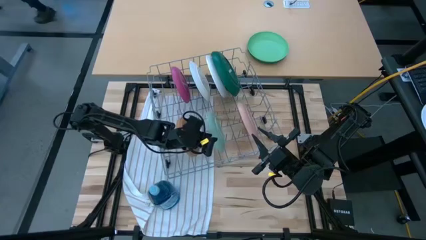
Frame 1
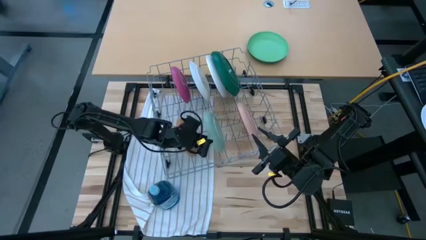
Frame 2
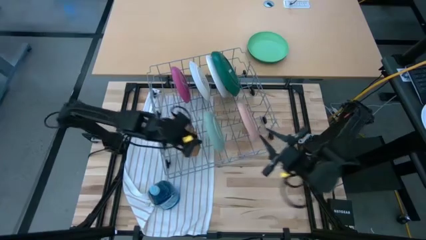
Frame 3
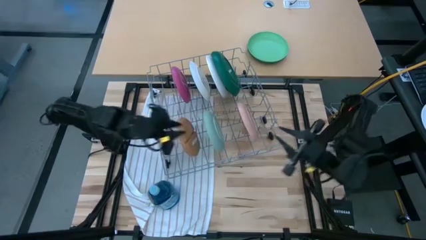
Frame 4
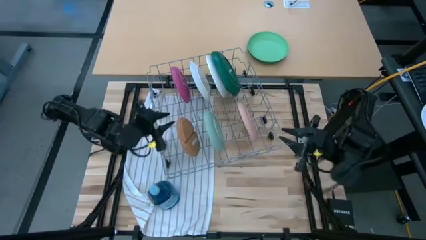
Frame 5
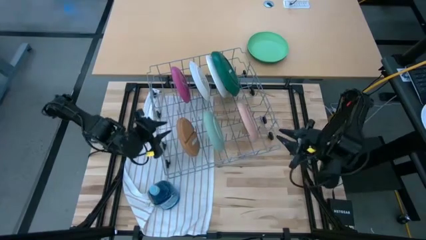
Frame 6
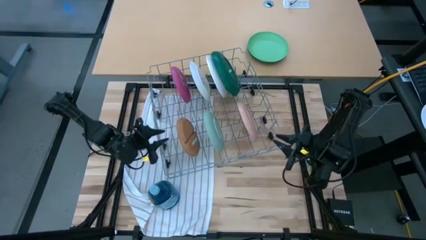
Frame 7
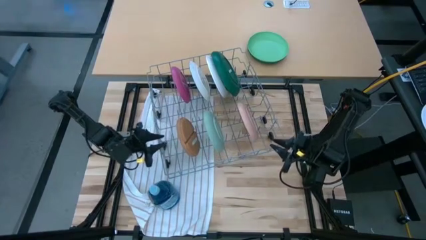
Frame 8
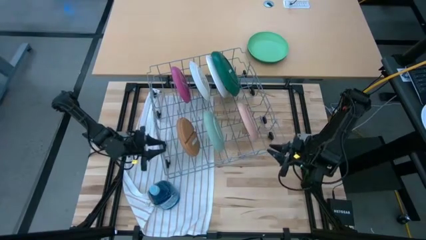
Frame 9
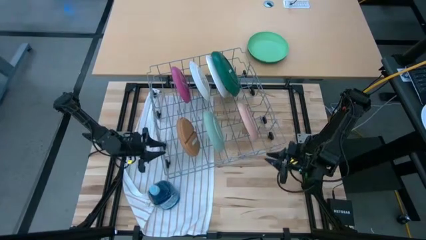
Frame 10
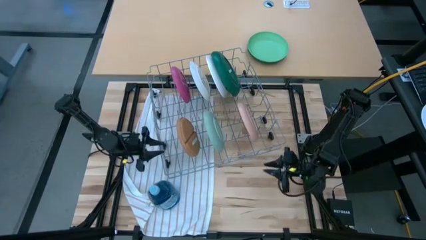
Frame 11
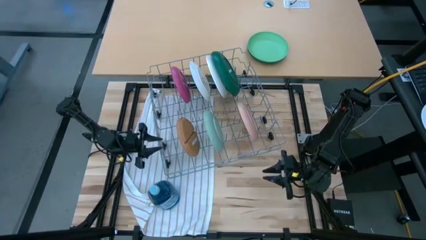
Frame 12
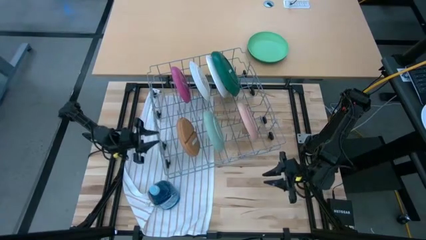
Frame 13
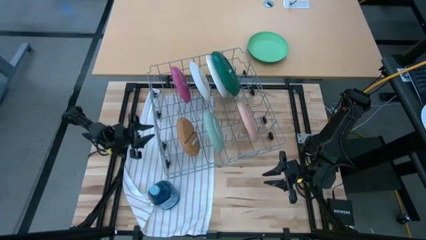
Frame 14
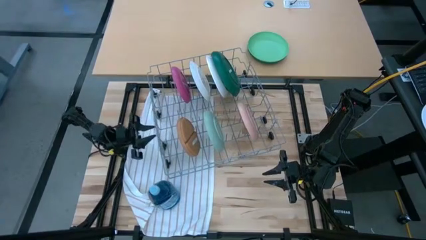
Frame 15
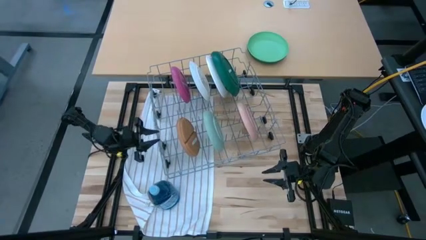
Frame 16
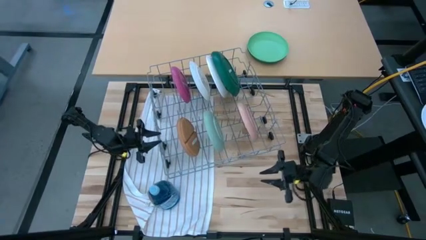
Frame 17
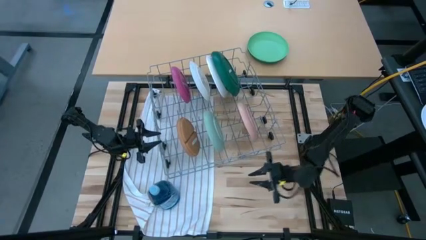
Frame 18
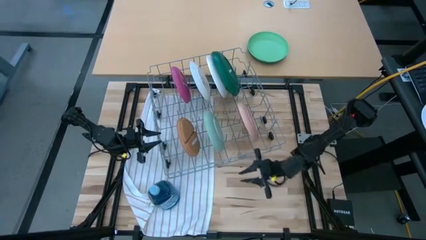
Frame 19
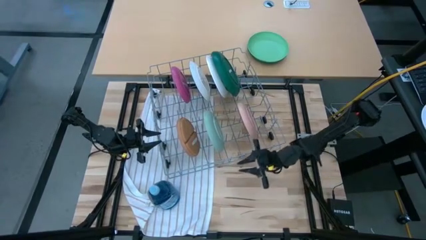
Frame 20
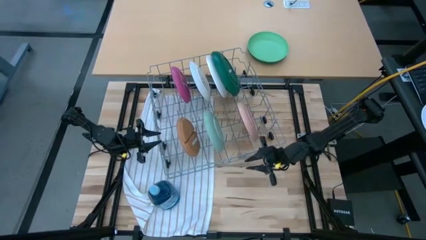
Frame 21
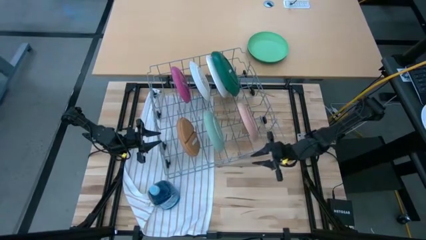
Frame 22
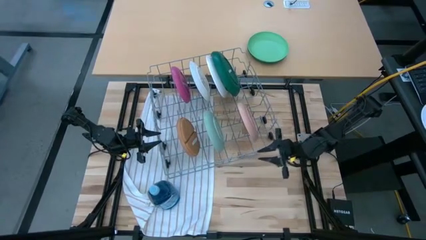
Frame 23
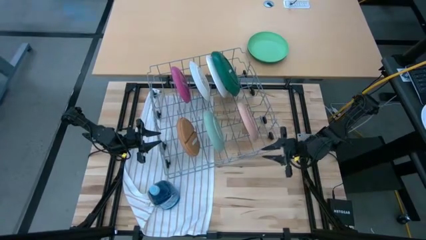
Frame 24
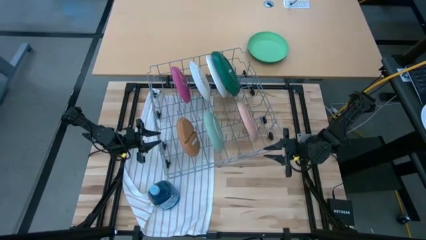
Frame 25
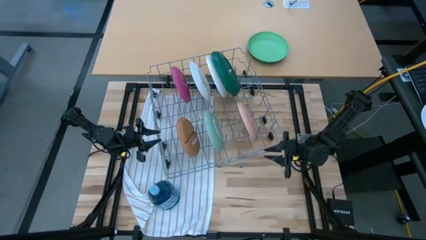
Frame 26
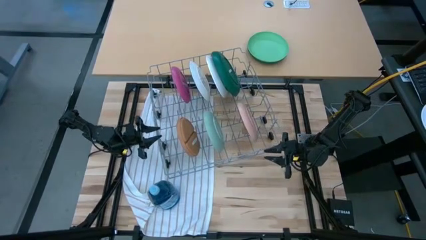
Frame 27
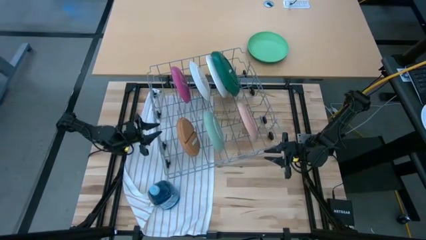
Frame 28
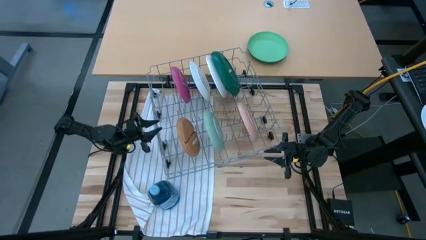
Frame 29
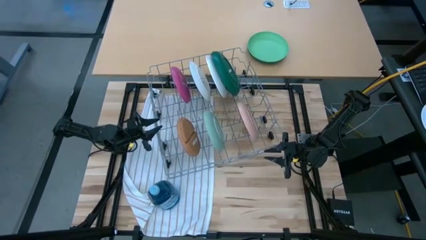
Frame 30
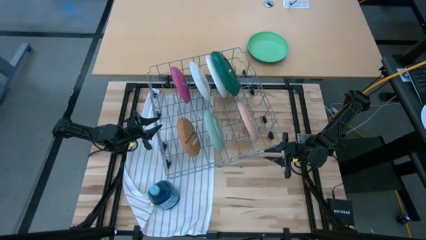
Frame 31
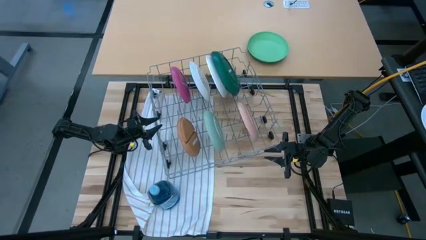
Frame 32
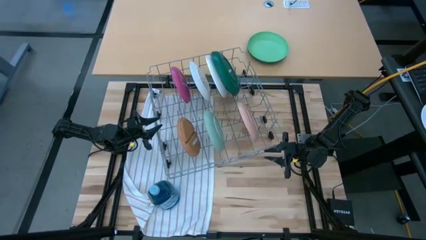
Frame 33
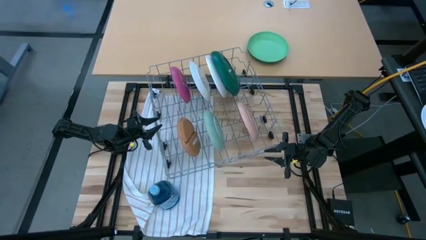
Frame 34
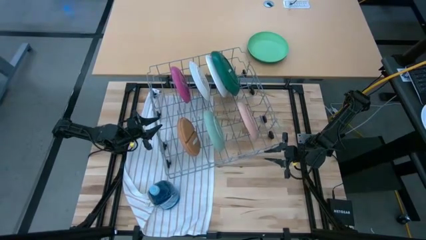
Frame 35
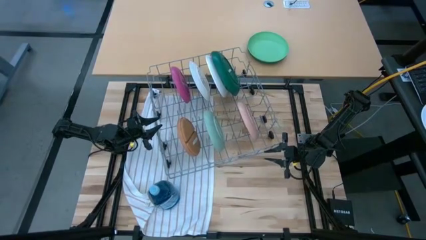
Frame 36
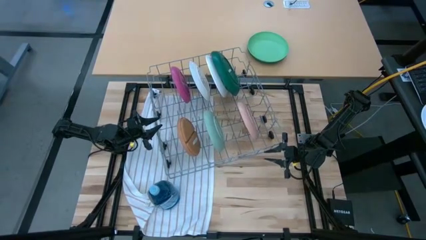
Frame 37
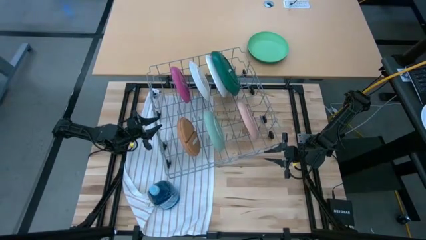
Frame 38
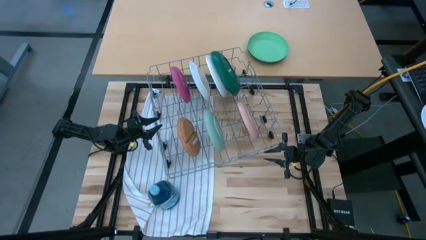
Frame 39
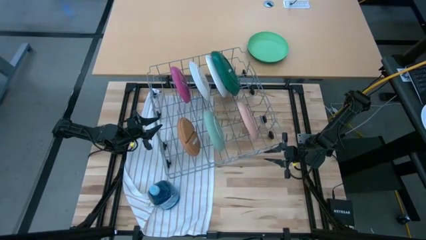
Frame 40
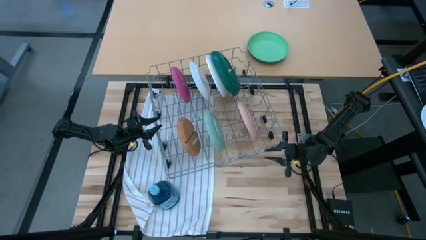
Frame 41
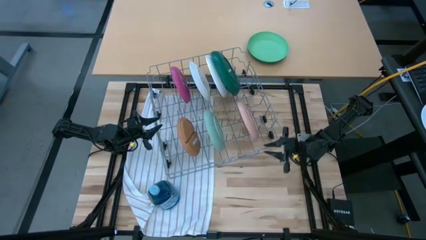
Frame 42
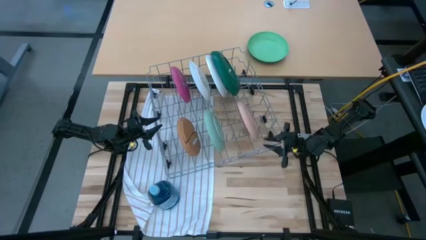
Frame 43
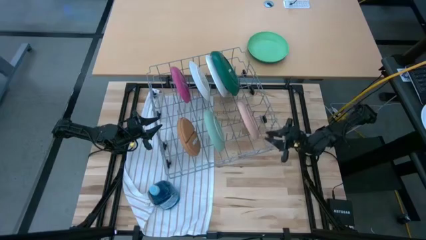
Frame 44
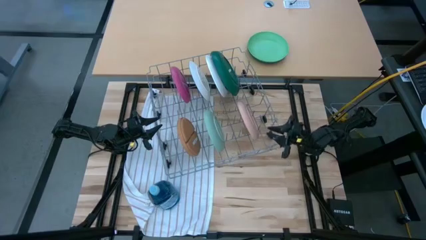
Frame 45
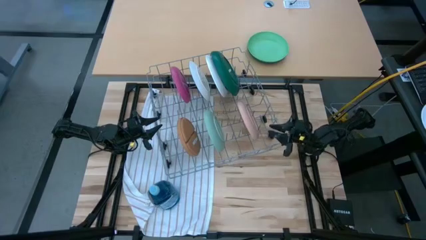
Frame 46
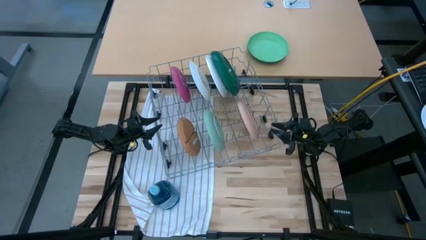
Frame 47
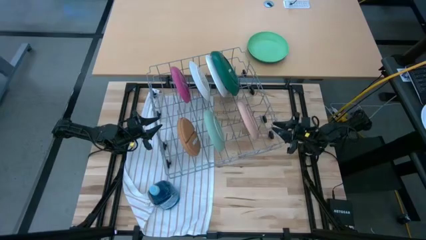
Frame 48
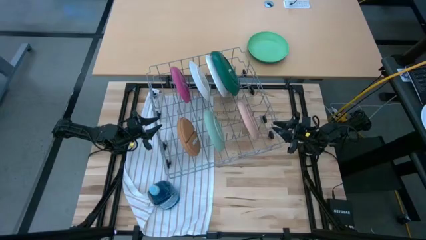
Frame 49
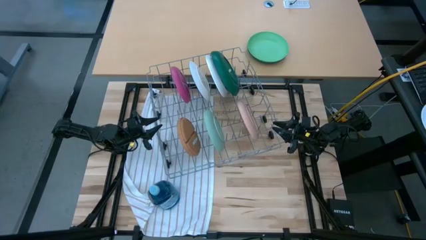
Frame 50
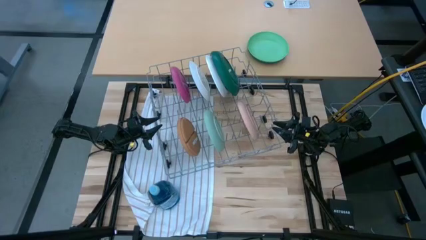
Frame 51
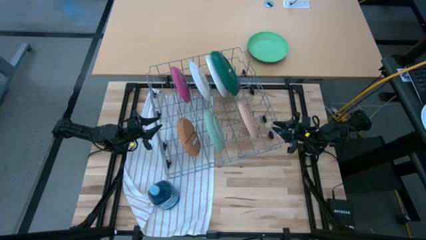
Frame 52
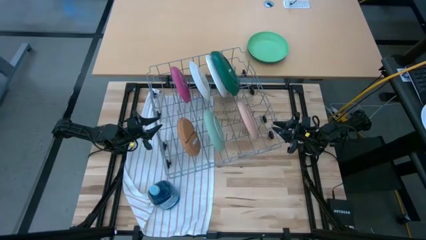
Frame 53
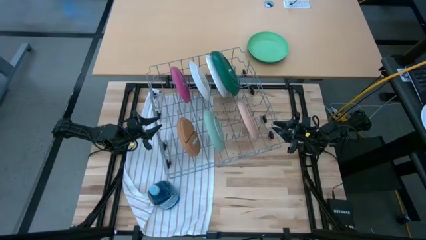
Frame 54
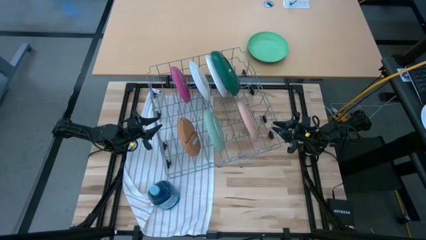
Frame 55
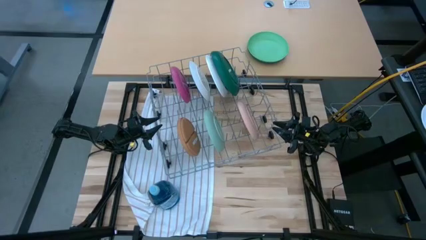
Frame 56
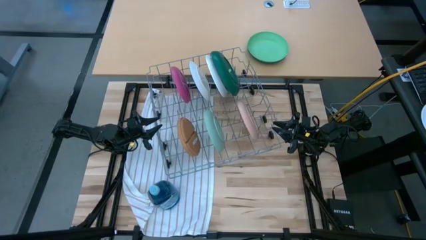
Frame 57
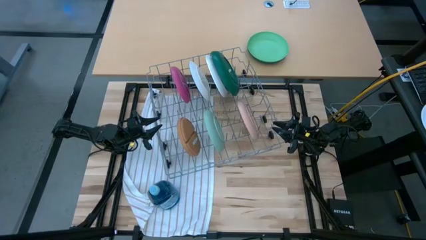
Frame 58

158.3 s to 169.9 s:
Task: Sort dishes
Return to Home Position

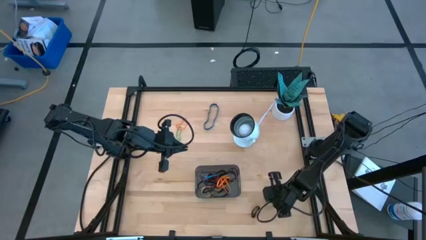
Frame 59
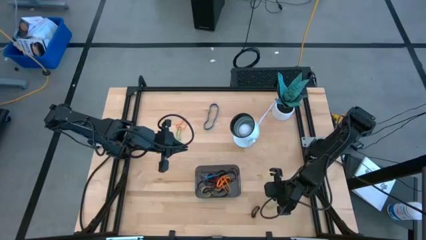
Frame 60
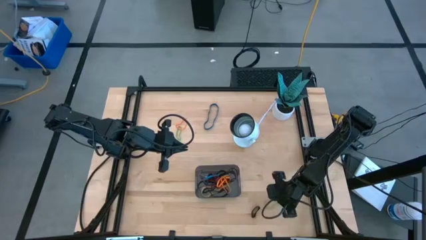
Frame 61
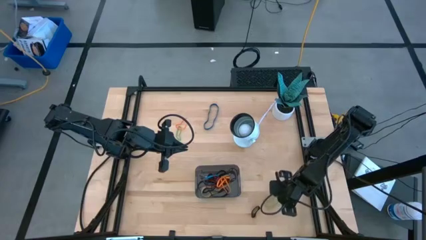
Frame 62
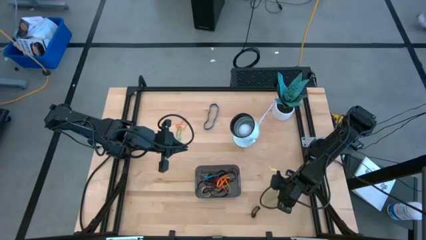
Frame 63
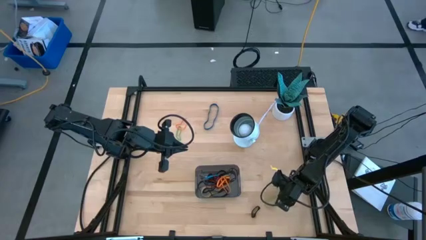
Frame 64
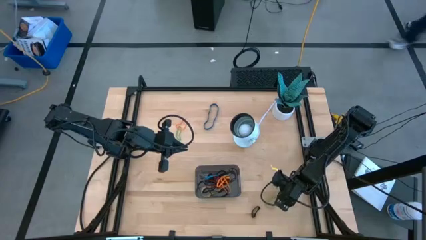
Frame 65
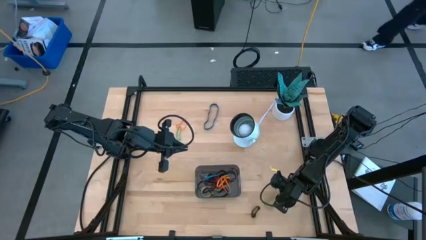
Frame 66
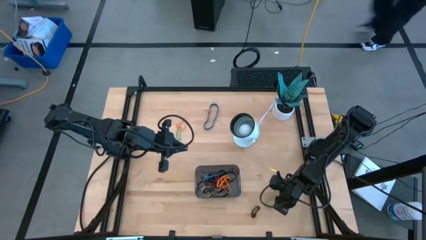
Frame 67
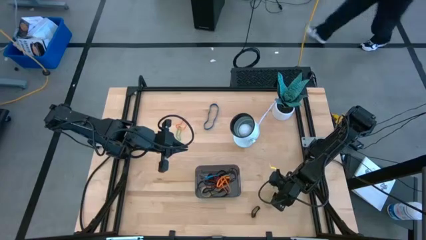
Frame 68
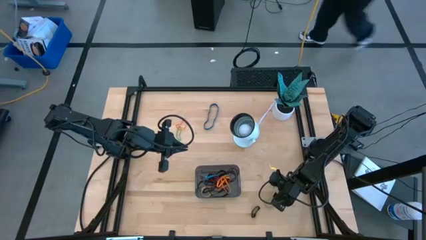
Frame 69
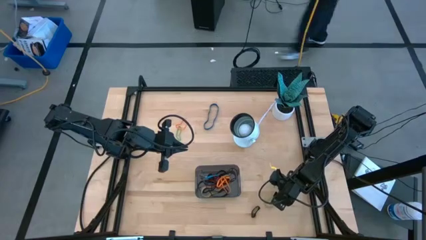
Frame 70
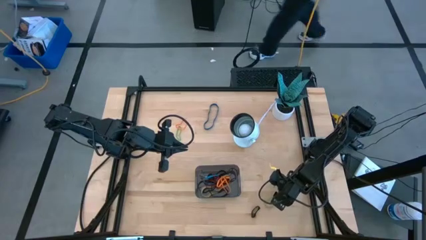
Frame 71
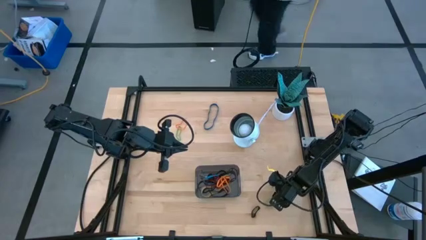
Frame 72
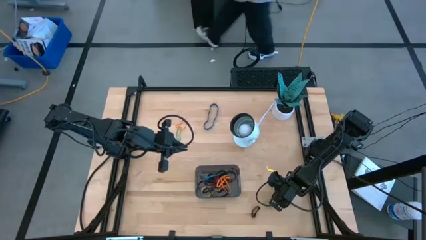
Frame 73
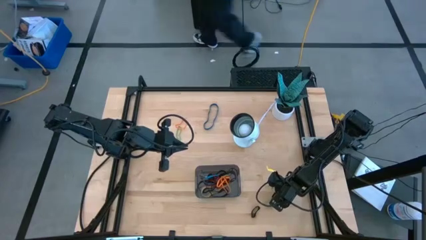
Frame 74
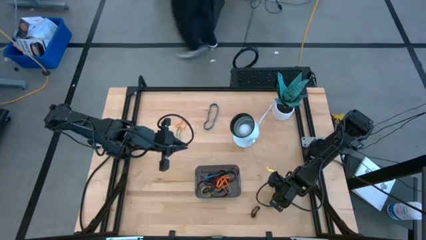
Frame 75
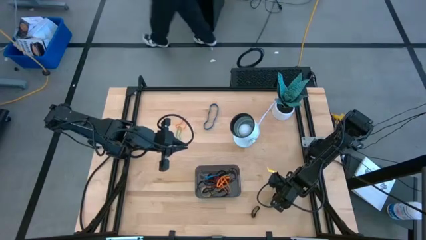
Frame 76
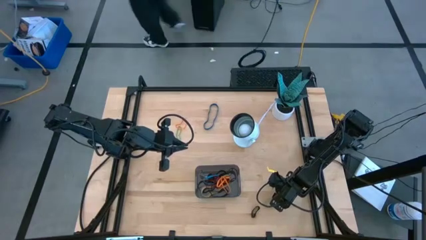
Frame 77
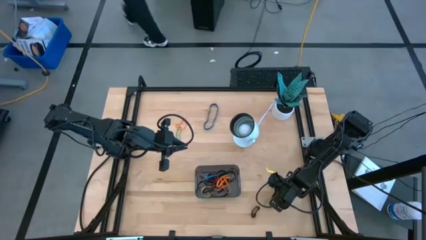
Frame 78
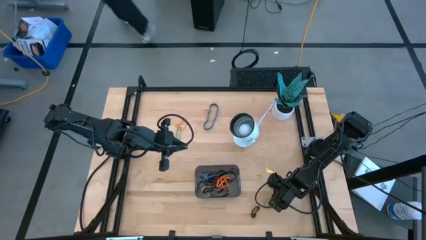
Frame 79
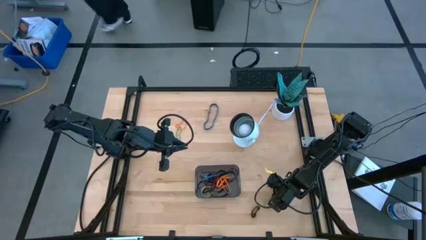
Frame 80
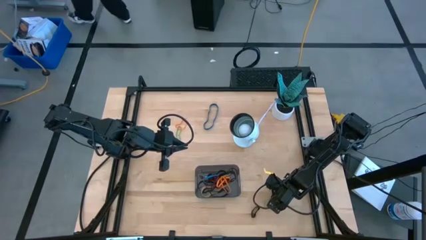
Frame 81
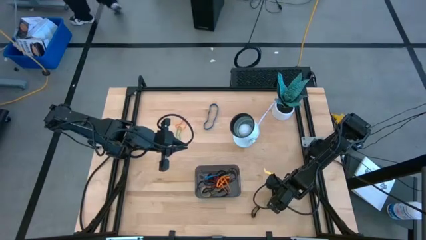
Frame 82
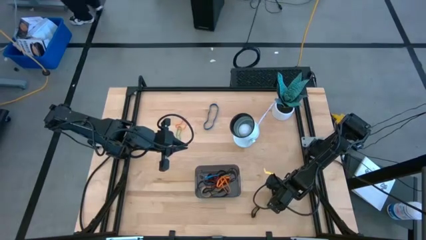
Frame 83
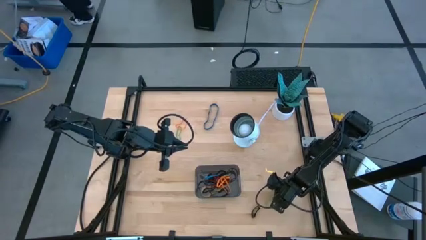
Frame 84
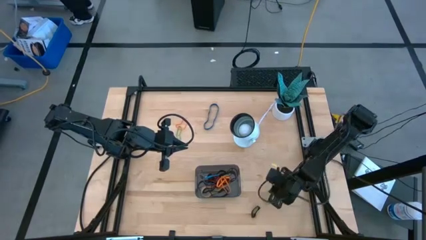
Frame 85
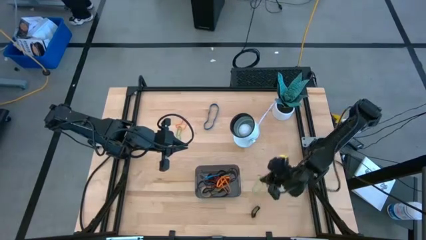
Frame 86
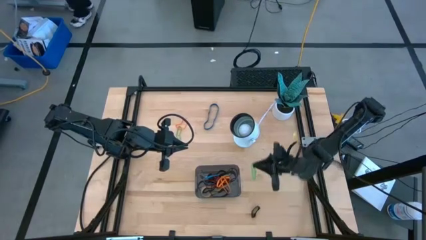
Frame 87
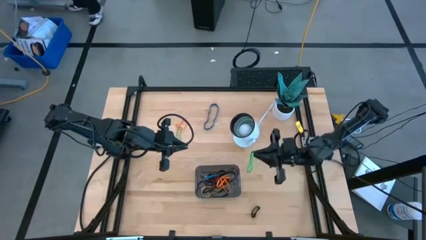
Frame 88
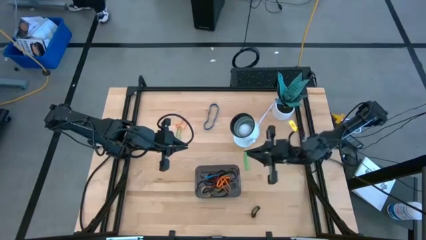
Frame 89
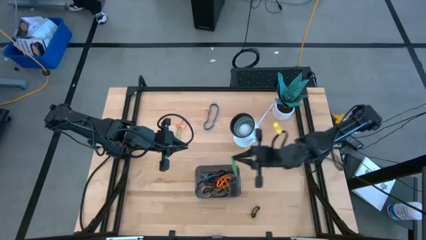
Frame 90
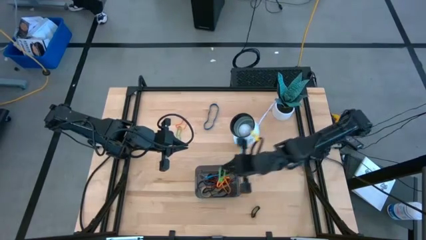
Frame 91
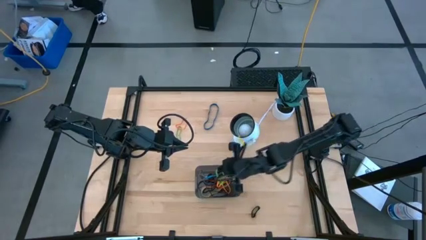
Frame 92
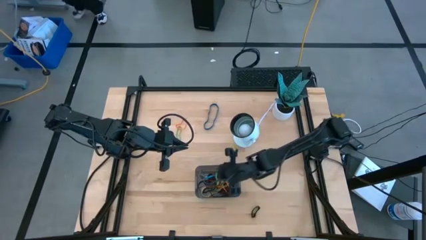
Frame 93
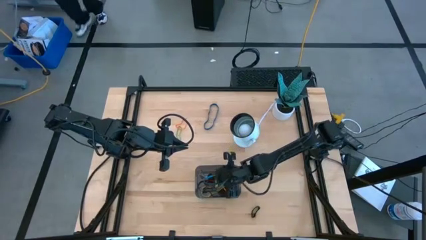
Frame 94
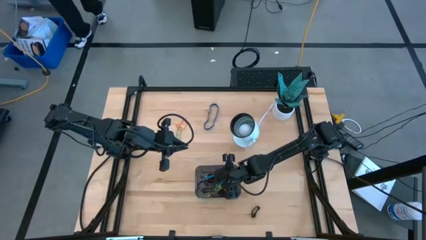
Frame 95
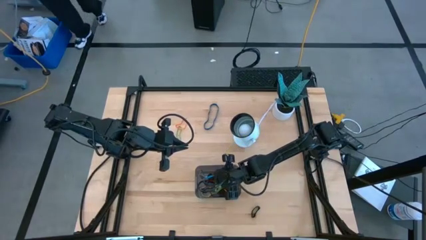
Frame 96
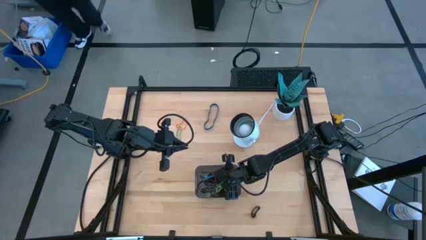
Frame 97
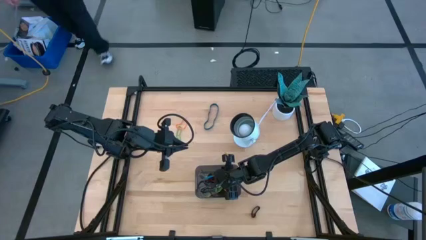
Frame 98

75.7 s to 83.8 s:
Task: Pick and place rubber bands into bin
Put the bottom green rubber band into the black bin
